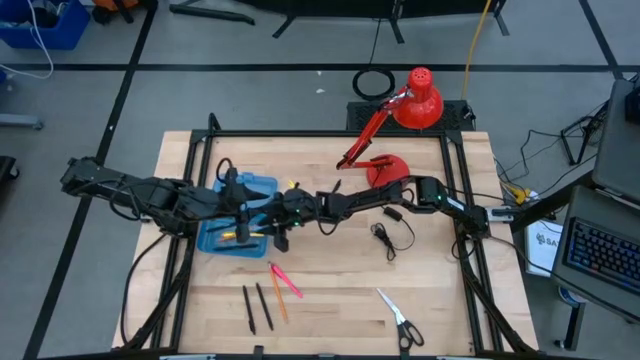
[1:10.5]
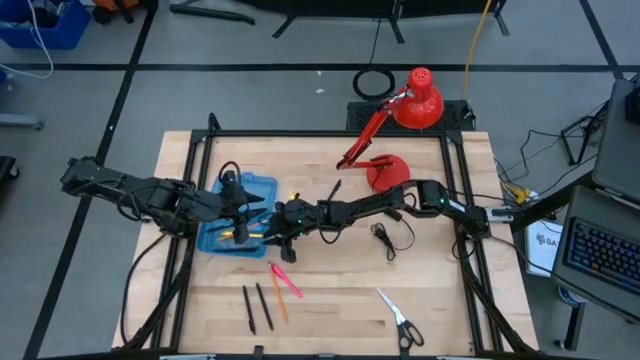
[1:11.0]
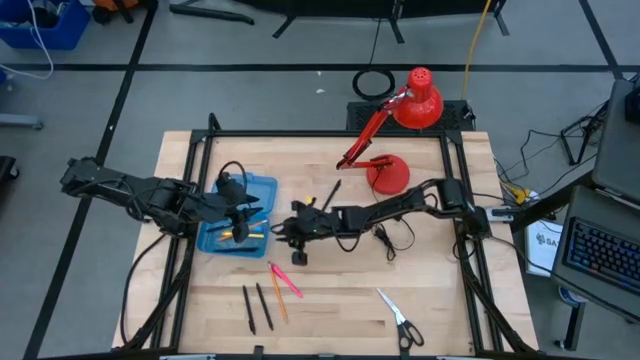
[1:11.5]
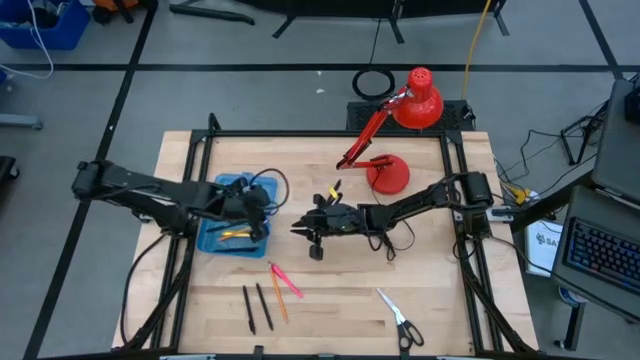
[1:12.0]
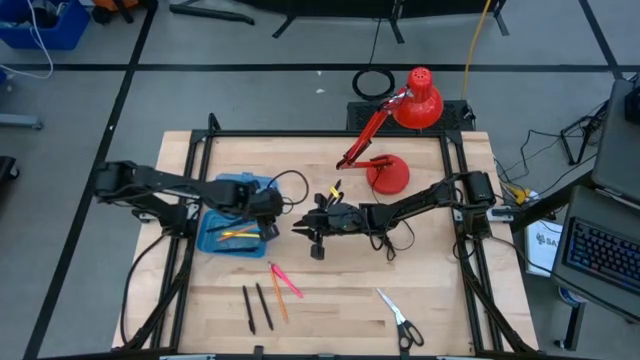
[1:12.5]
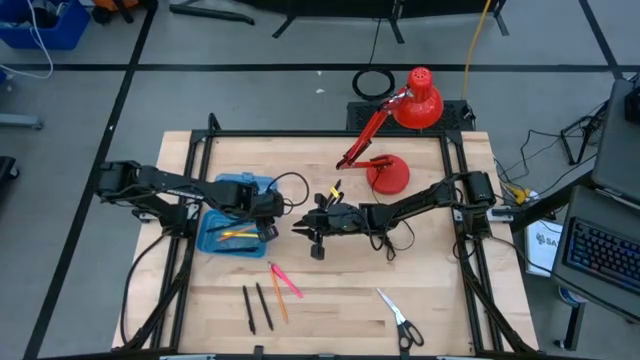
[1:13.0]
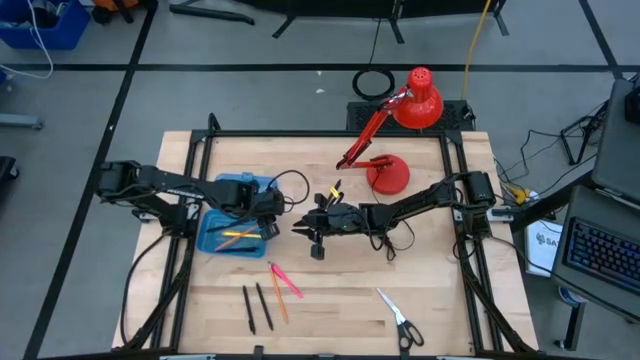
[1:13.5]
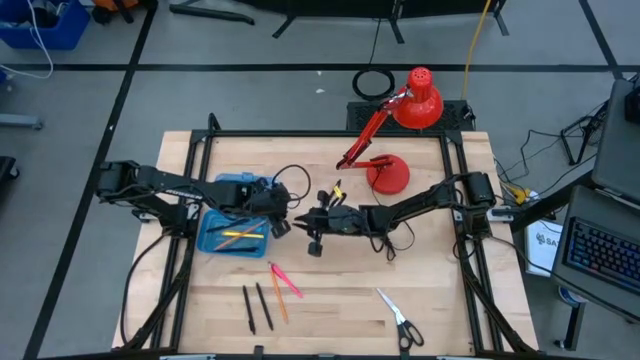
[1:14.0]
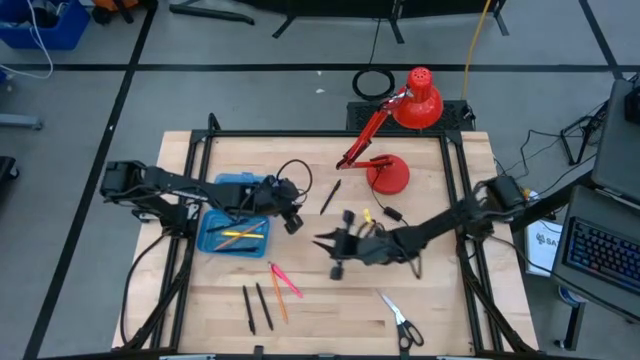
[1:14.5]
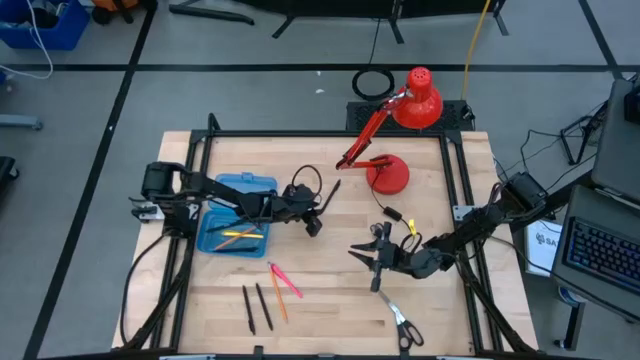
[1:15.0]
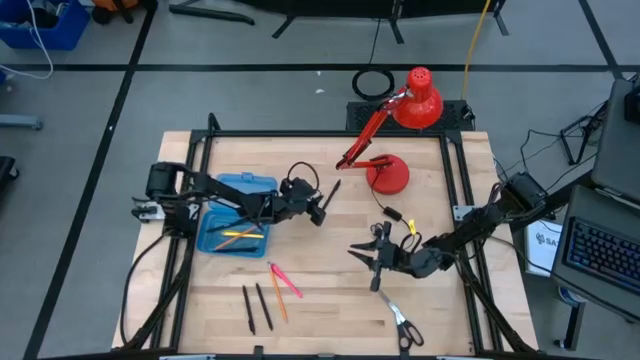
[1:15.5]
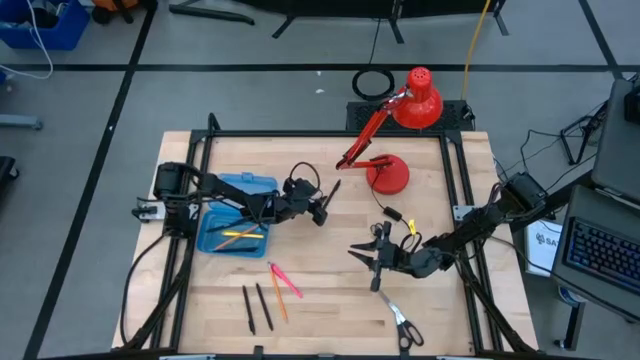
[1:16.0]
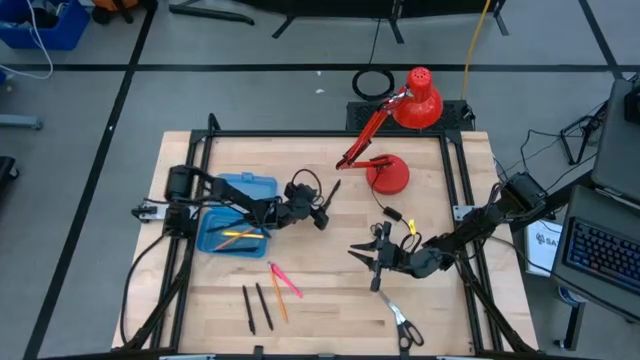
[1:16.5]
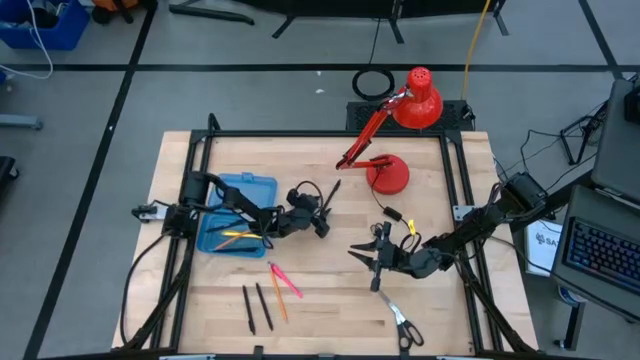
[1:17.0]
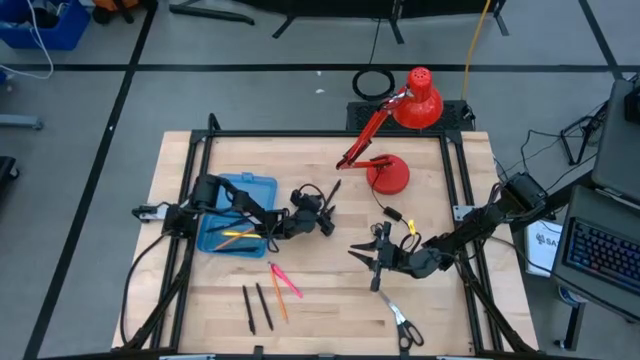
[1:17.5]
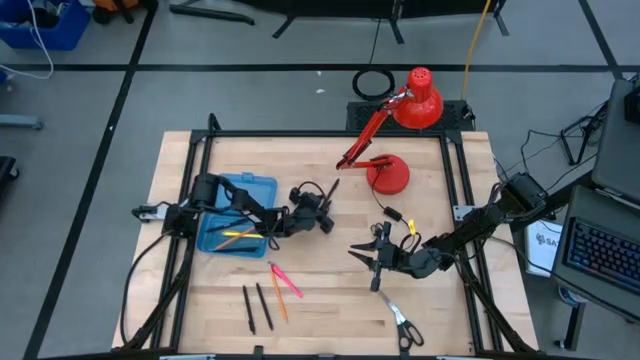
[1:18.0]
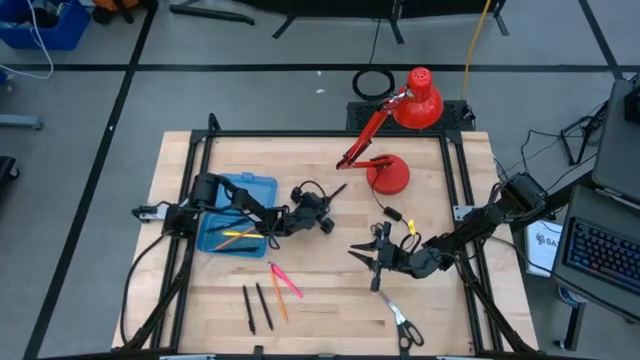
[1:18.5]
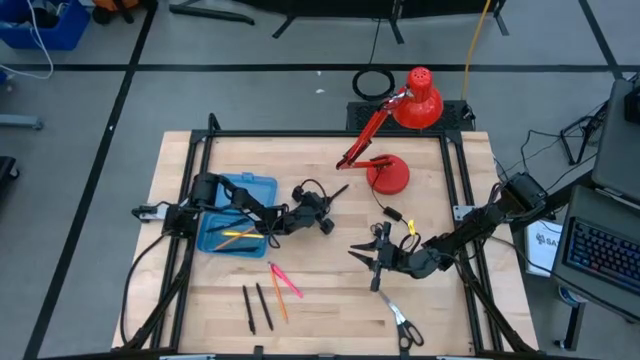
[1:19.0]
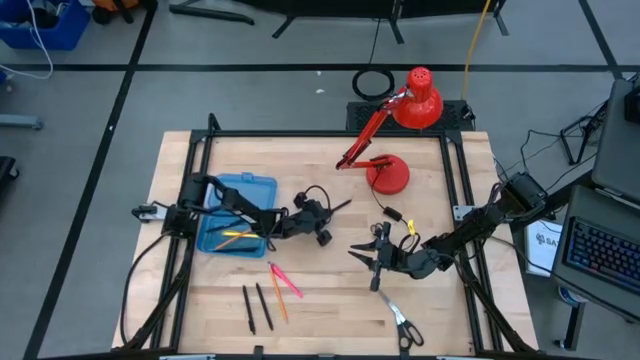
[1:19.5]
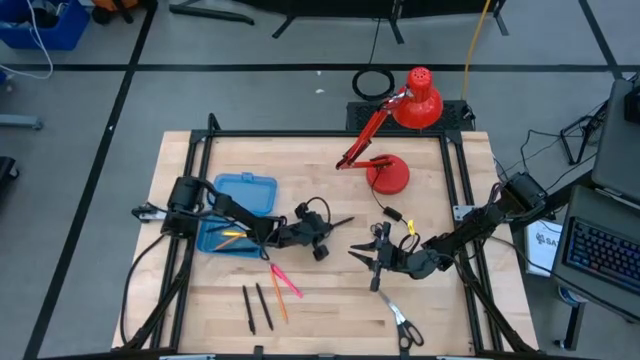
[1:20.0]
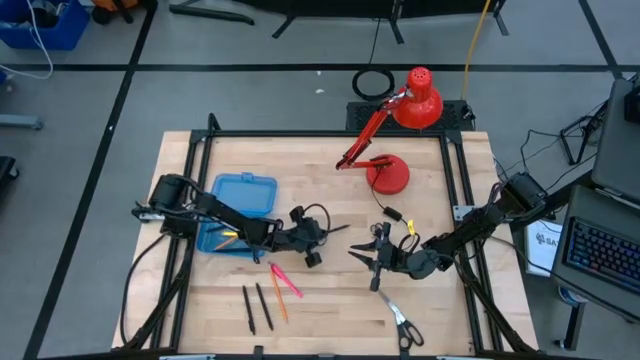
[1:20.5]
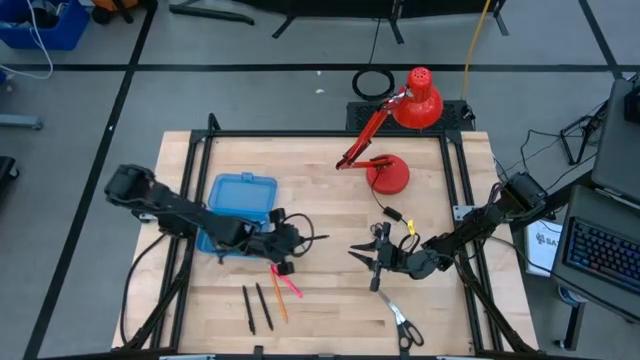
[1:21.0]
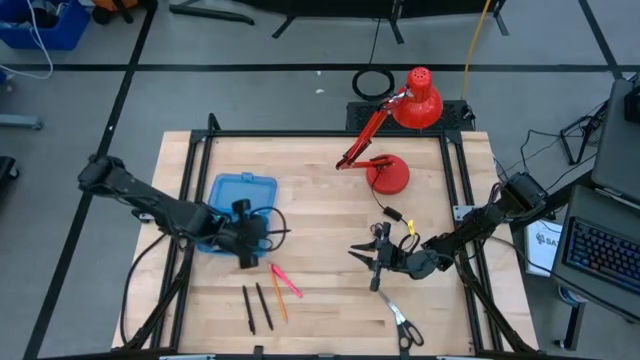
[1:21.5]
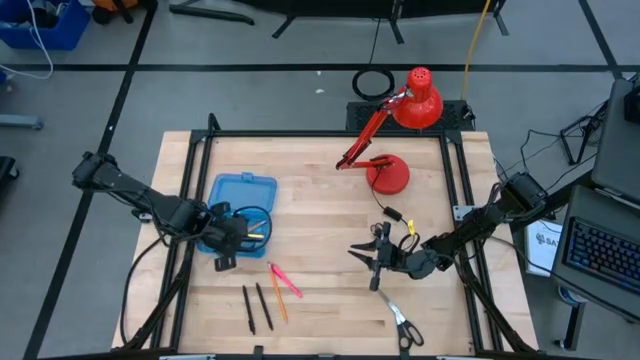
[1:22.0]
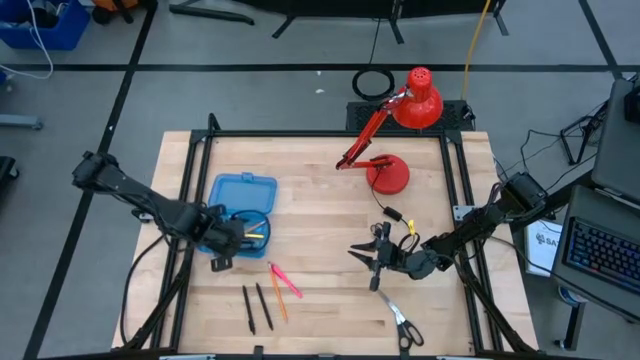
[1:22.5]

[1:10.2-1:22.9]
Task: Pick & place school supplies into a supply box
Put the black pen into the blue supply box

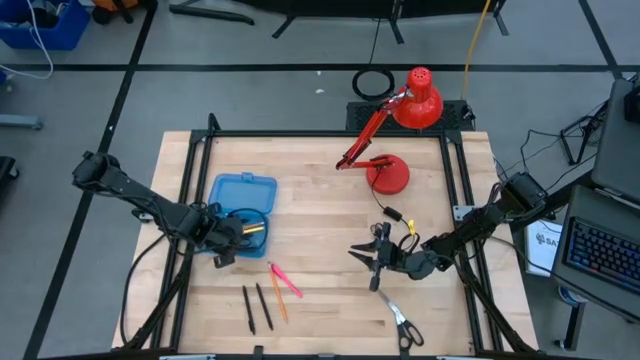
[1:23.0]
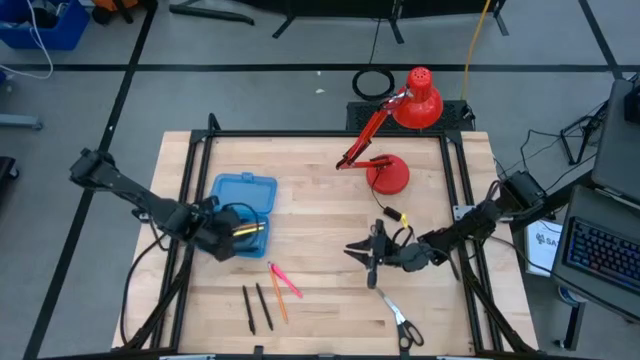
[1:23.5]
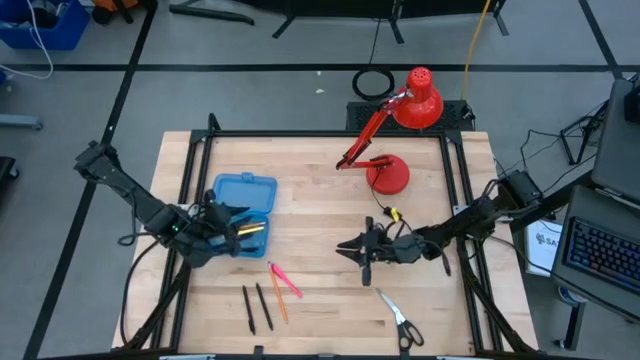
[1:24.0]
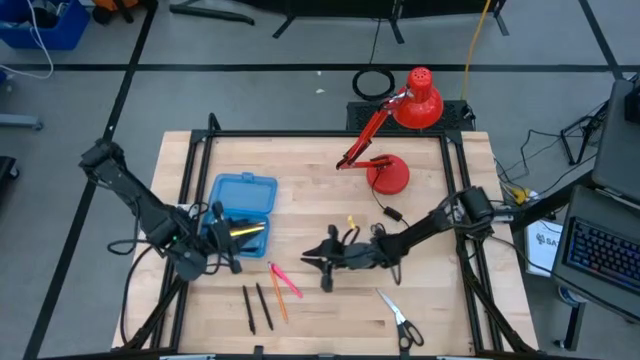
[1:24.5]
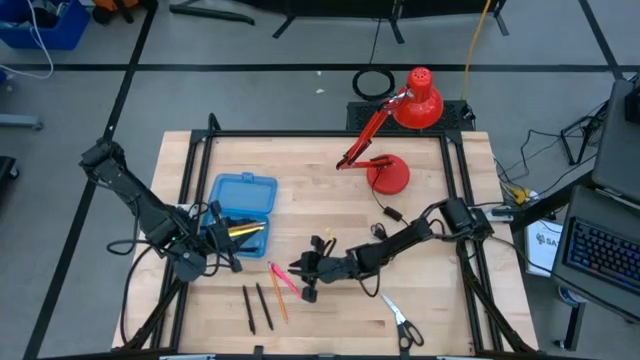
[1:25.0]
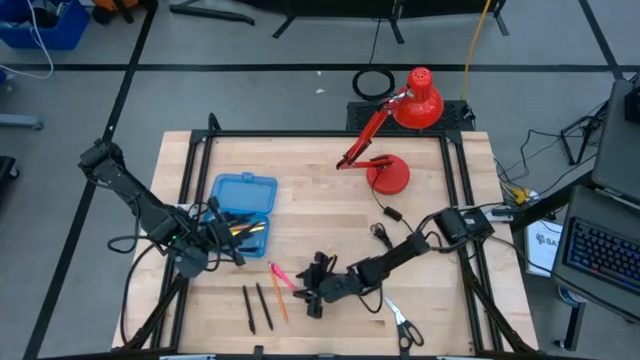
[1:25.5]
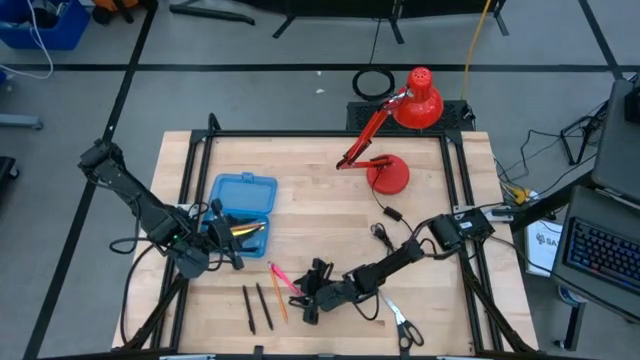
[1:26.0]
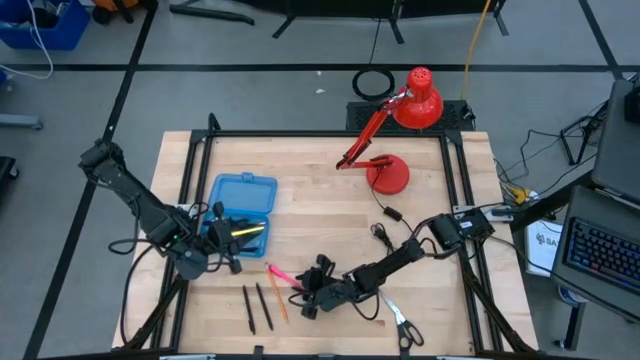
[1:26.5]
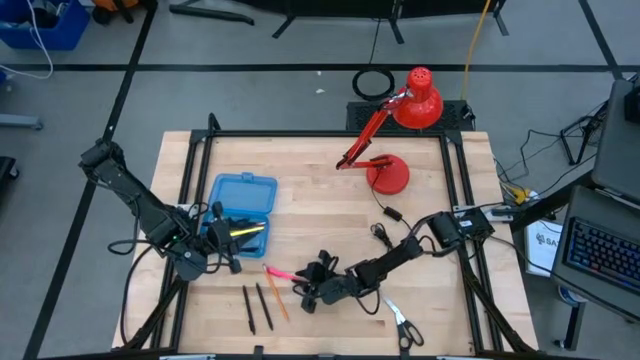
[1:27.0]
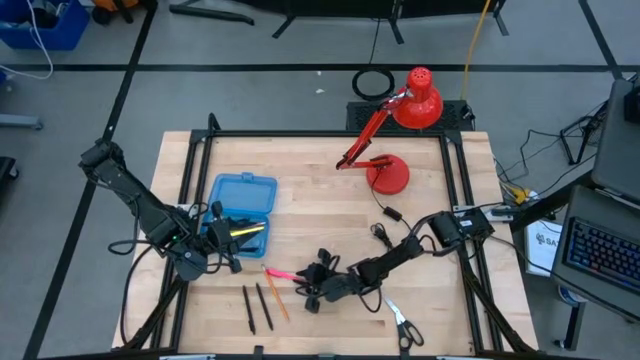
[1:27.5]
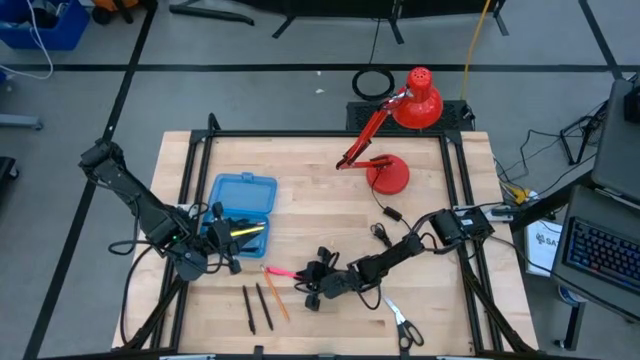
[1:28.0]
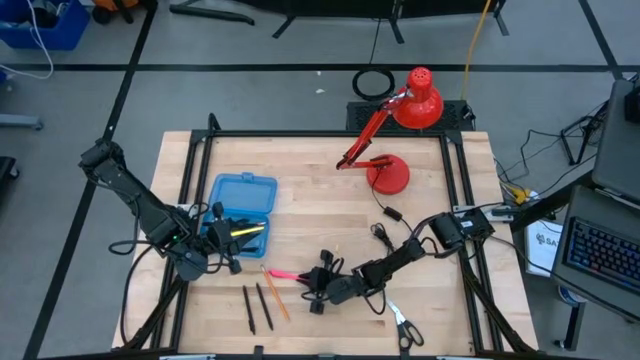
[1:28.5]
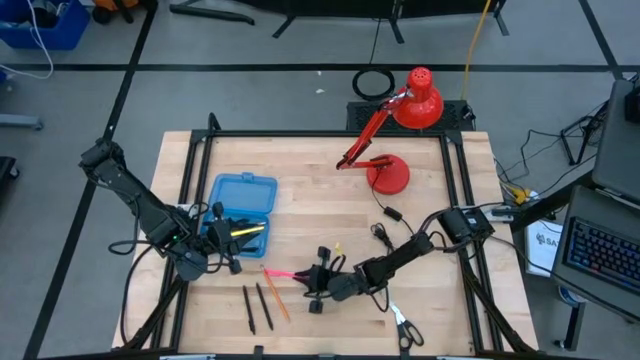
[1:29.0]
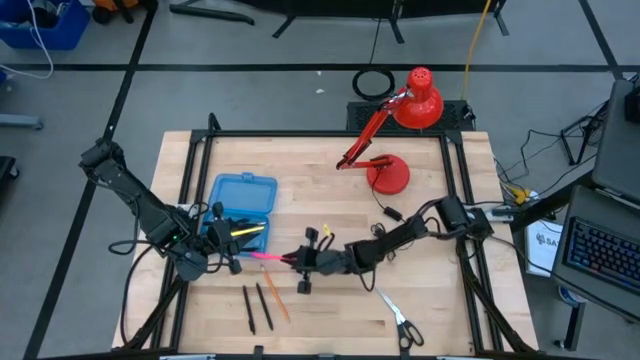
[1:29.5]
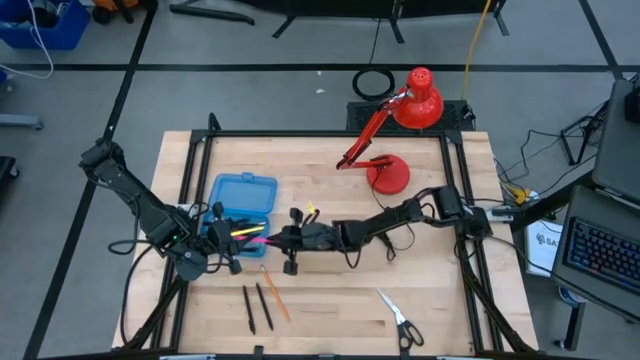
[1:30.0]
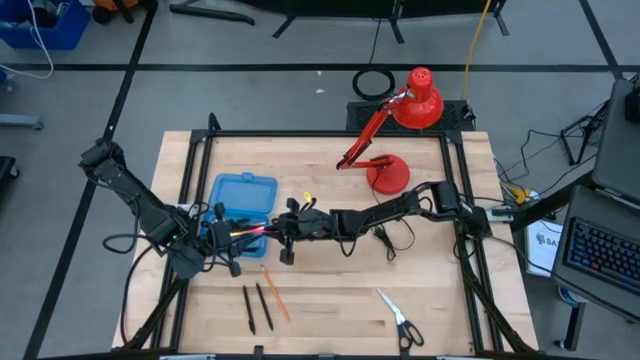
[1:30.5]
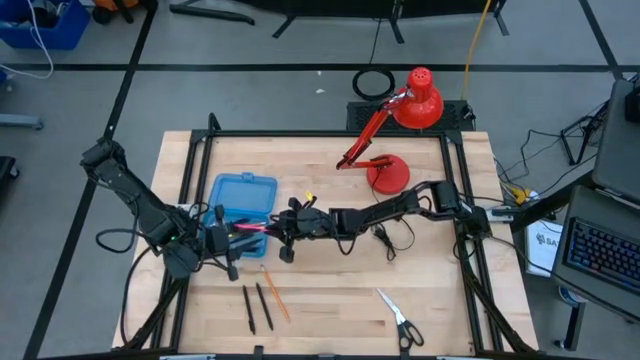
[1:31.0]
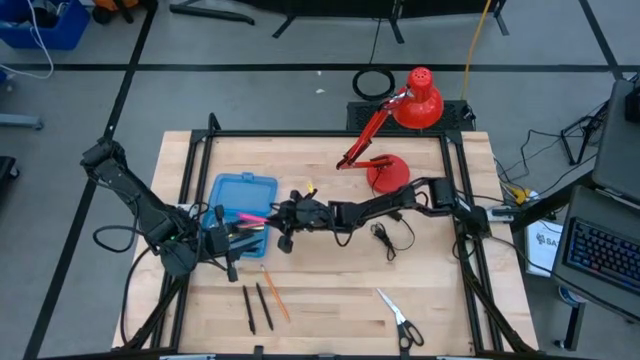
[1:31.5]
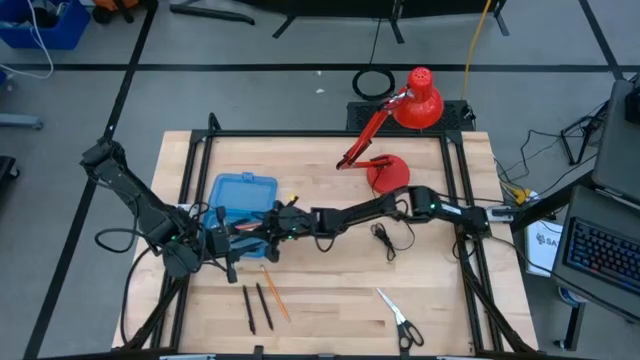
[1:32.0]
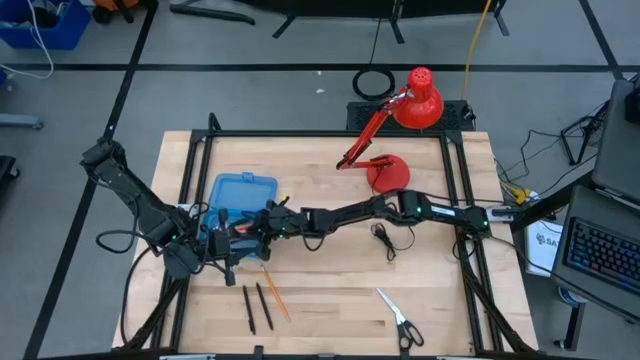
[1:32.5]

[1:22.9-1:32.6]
Put the pink pen into the blue supply box
